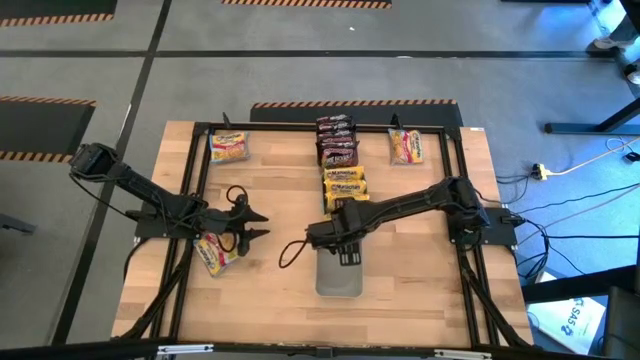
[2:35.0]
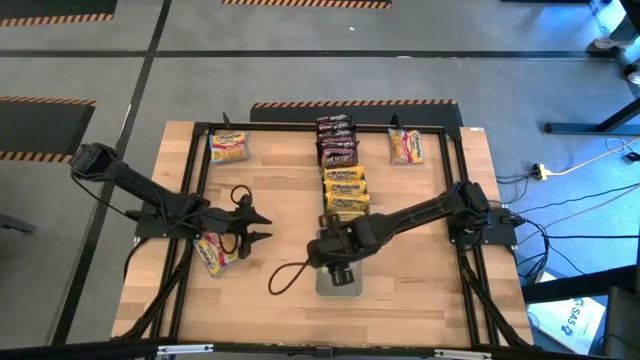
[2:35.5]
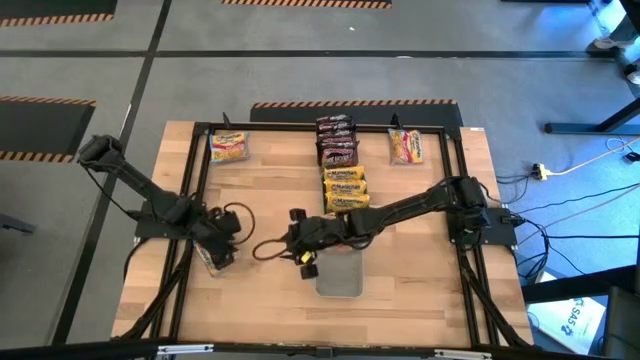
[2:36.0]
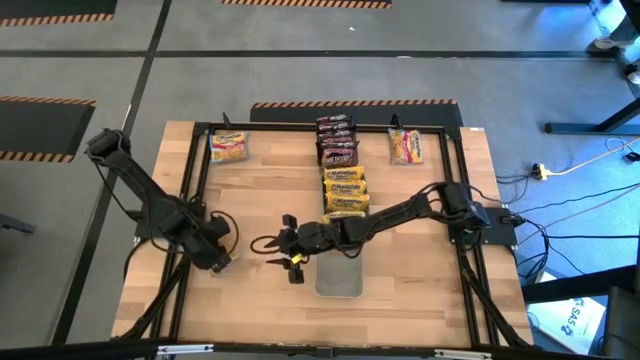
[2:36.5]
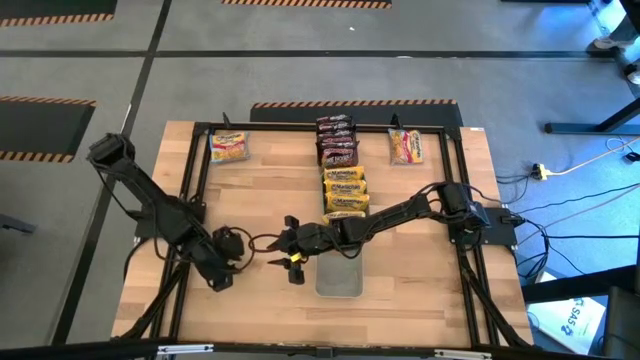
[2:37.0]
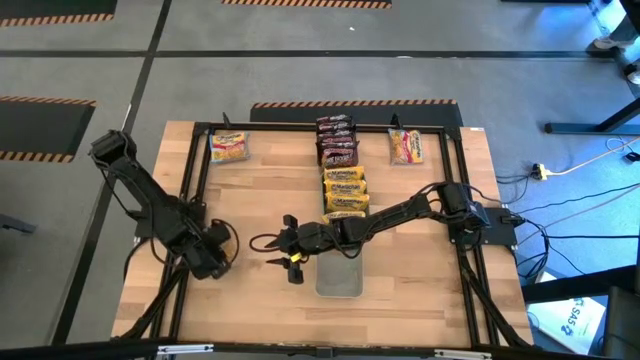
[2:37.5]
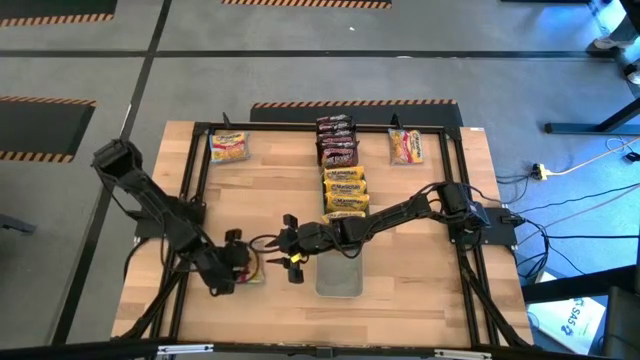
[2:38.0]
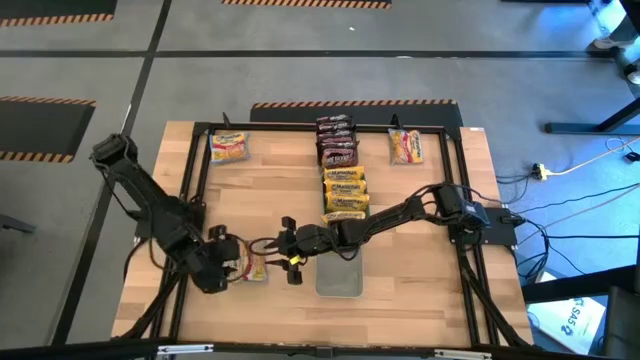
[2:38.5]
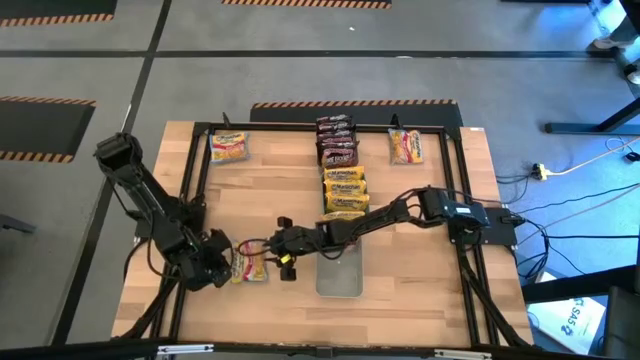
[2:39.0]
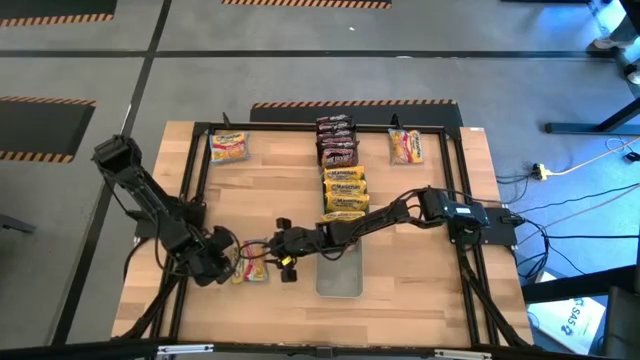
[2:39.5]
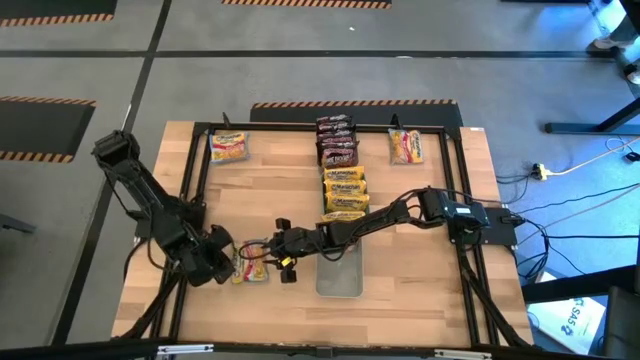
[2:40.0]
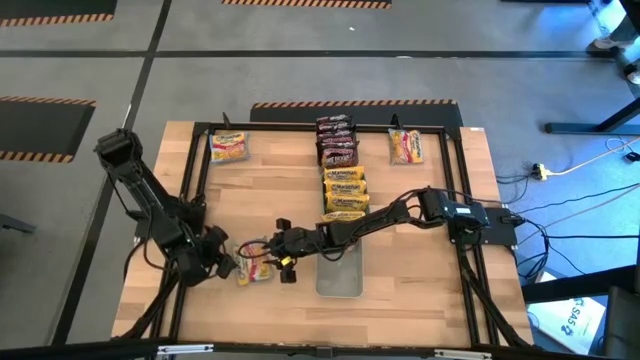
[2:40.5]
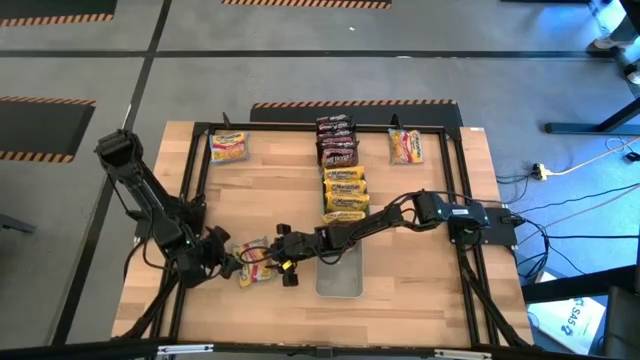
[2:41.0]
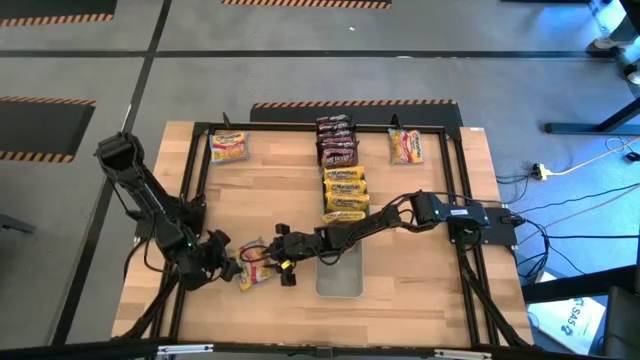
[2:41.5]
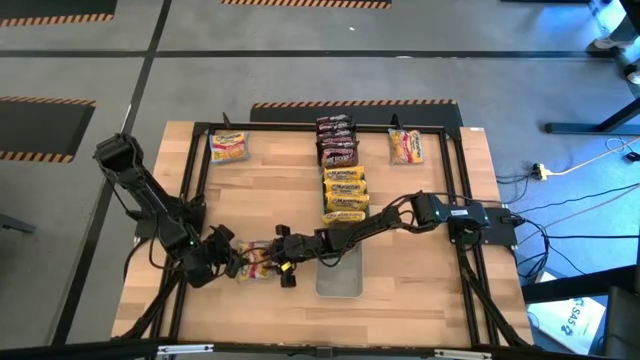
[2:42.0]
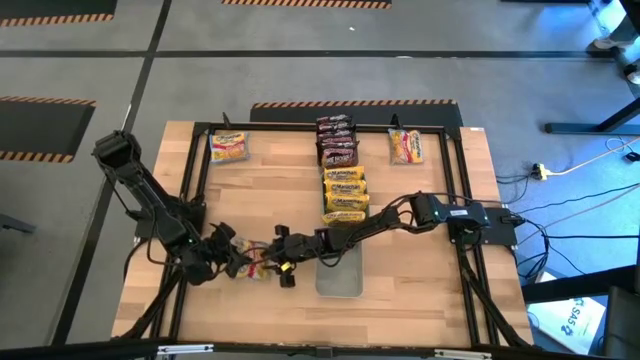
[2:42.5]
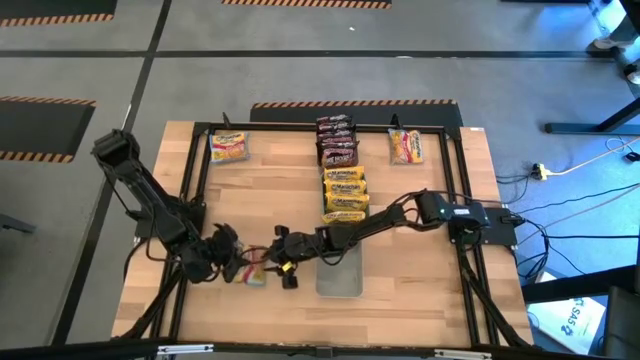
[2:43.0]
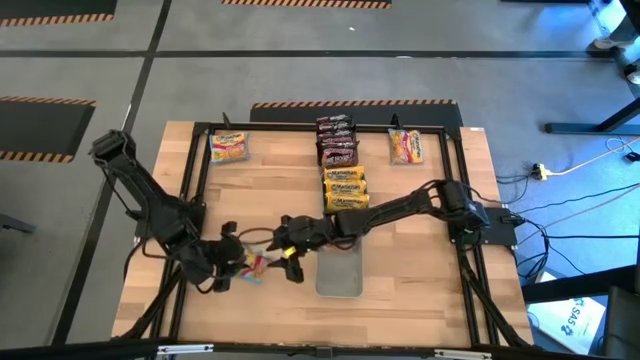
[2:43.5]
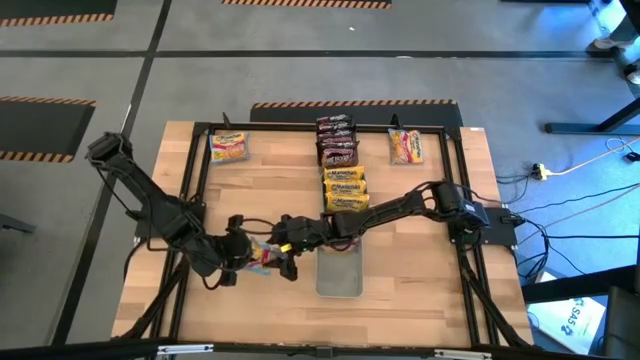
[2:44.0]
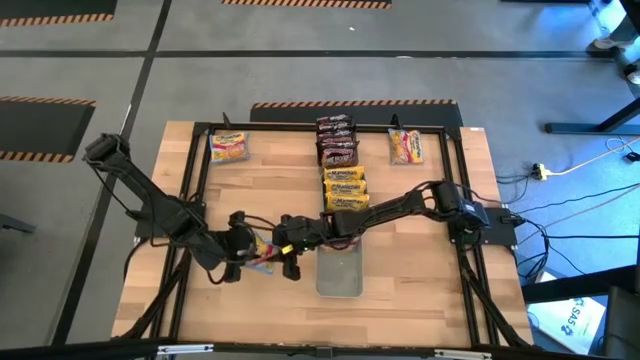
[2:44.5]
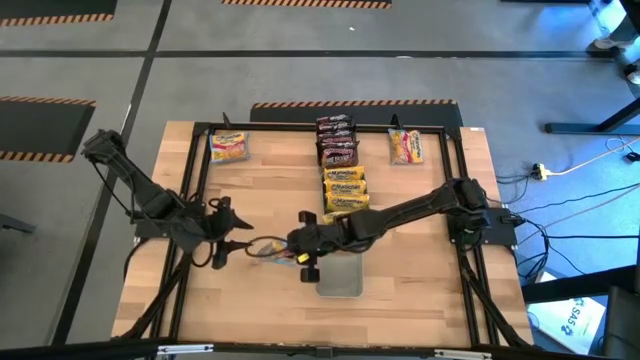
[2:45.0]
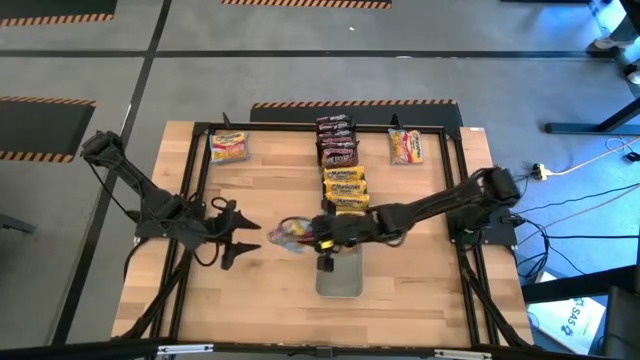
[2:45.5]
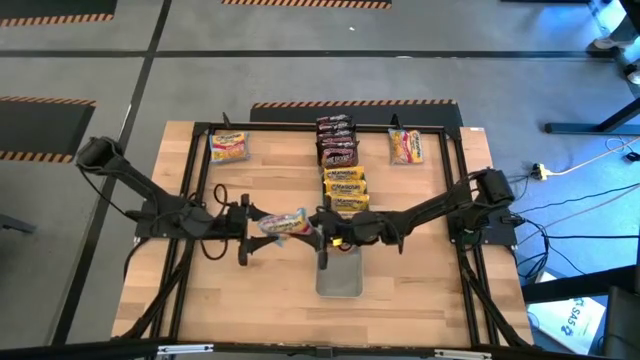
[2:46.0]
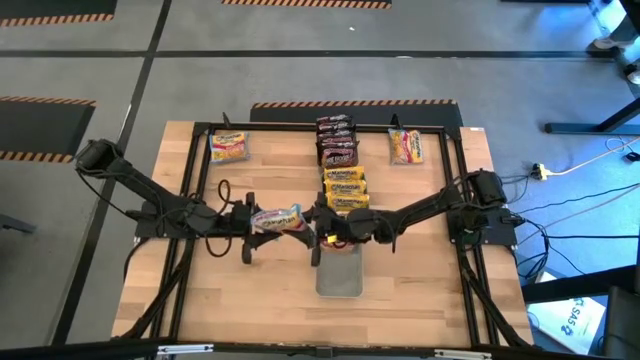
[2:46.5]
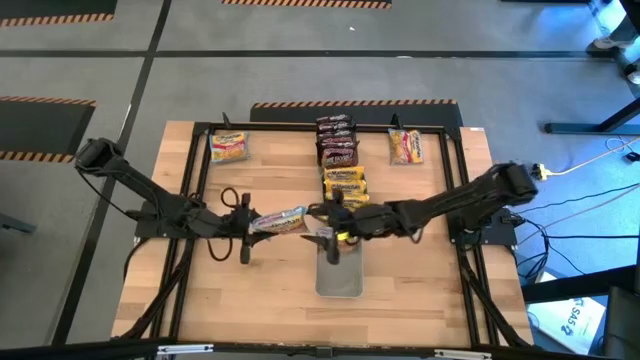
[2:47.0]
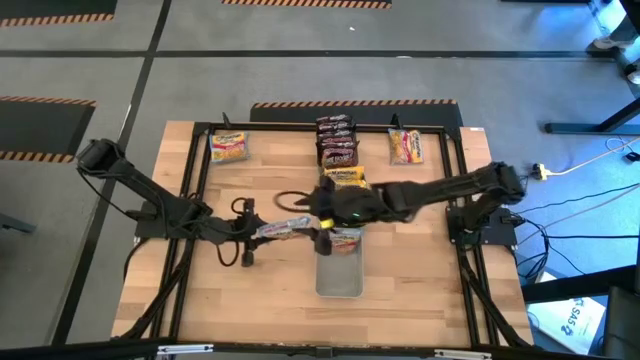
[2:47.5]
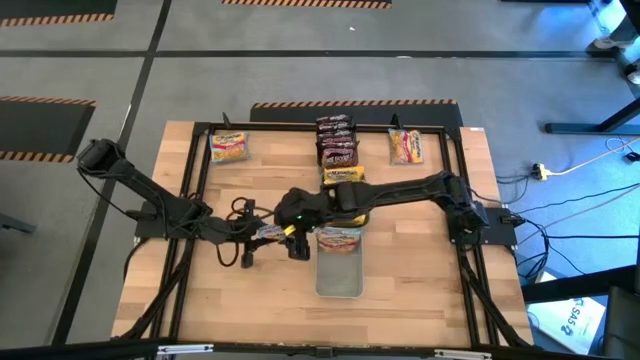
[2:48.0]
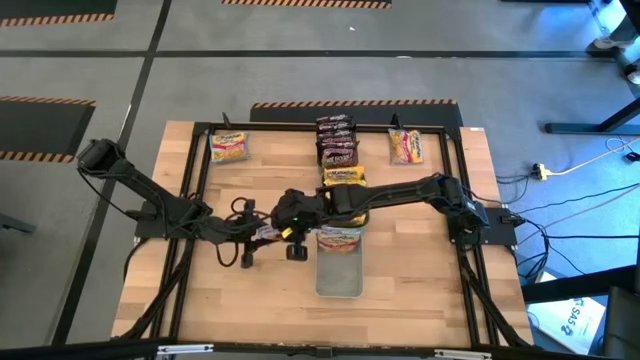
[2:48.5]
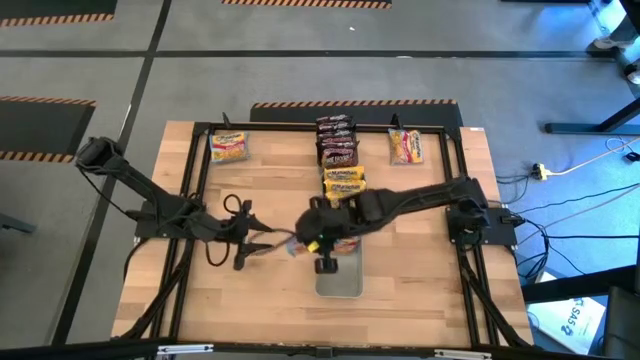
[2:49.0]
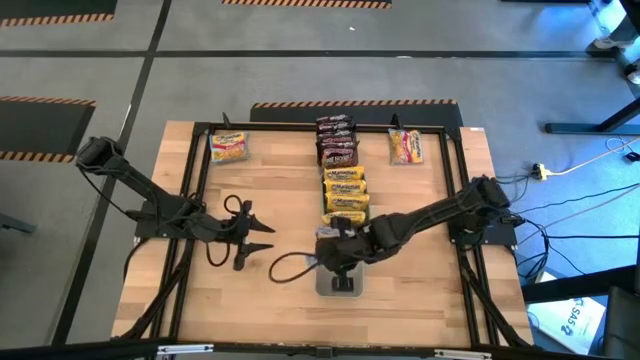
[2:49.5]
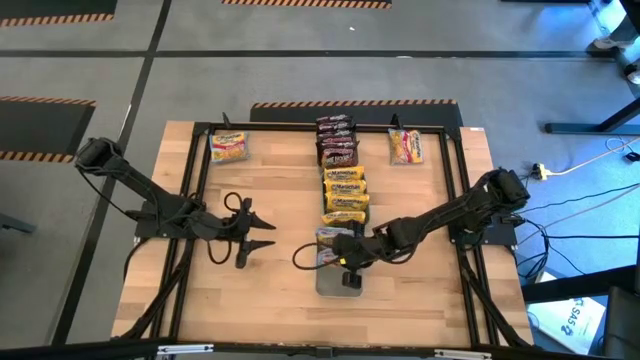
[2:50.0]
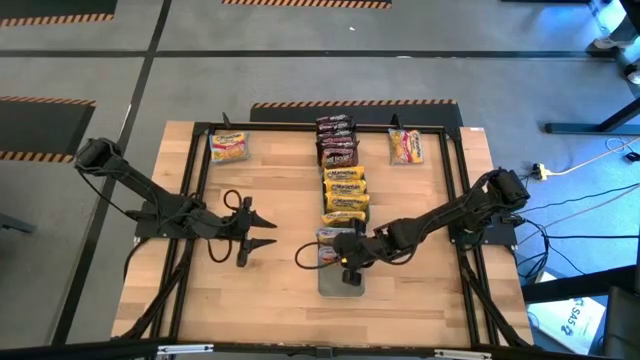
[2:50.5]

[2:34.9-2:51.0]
Task: Sort Maruchan noodles
Put the blue noodle pack into the gray bin

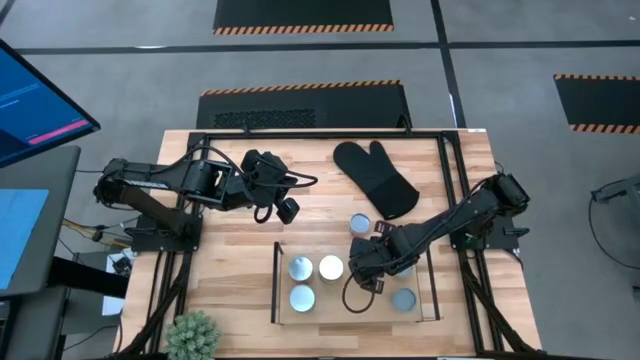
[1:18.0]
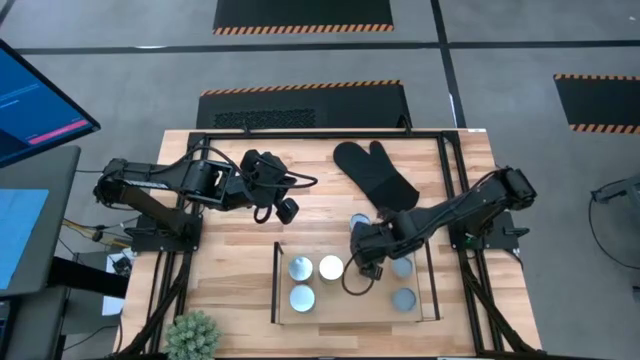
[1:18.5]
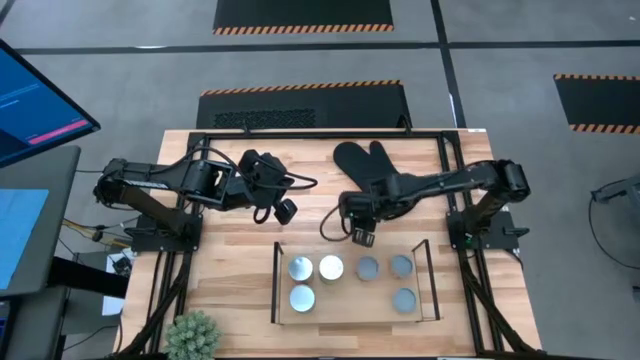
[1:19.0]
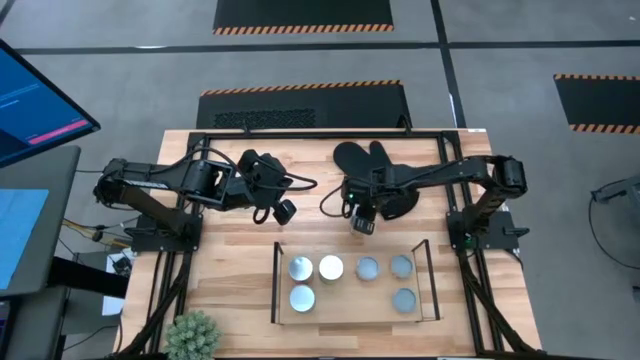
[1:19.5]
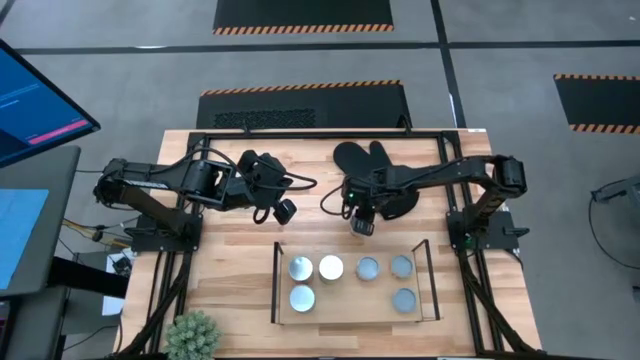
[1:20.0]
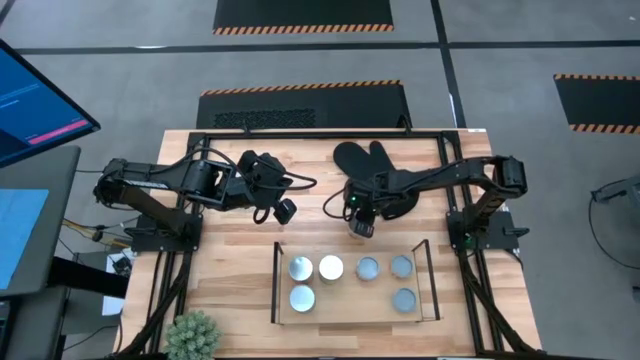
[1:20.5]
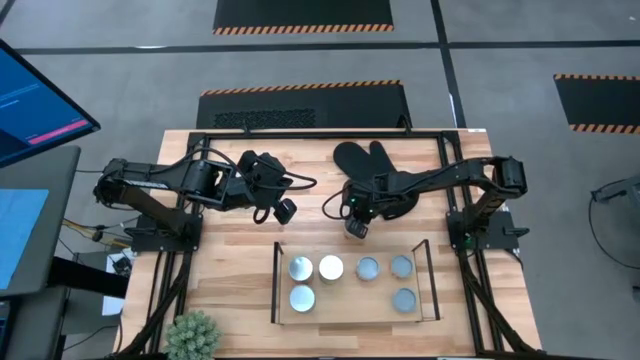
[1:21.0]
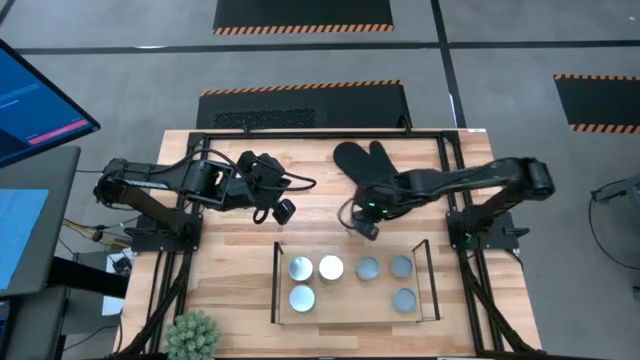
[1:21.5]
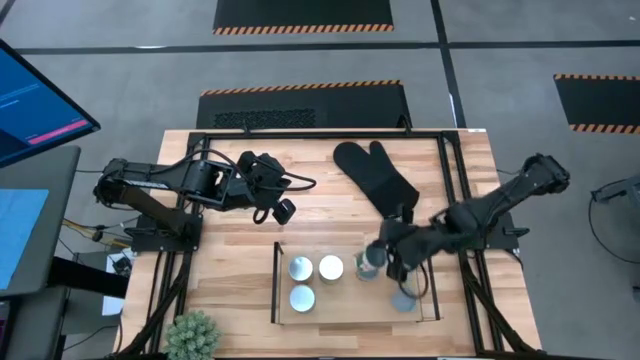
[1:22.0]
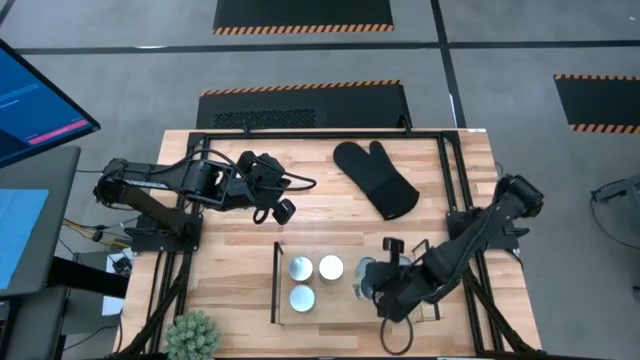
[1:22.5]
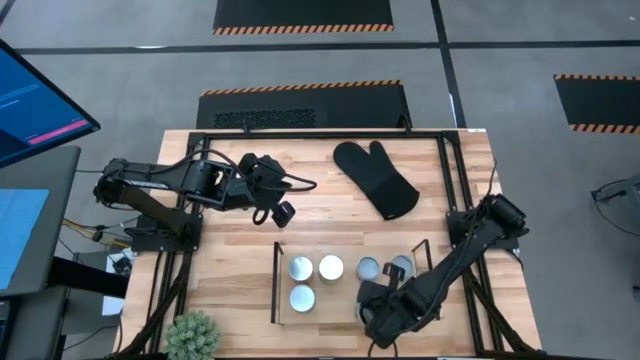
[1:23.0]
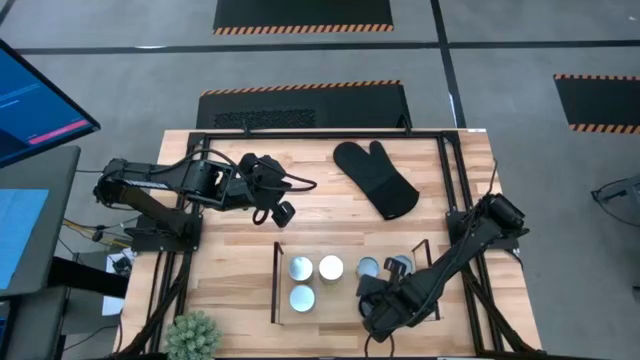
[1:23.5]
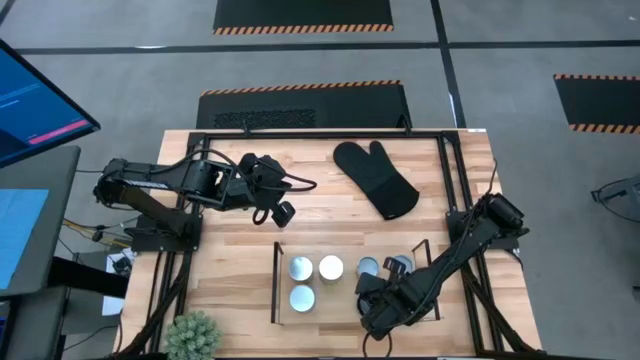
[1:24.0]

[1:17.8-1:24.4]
Task: Pick and place cans onto a shelf
Put the canned peas on the shelf
